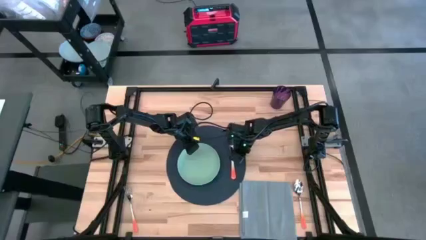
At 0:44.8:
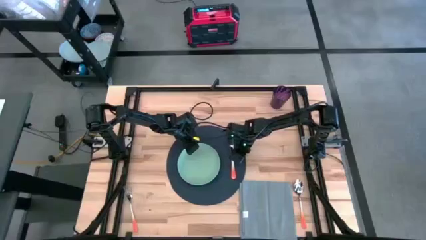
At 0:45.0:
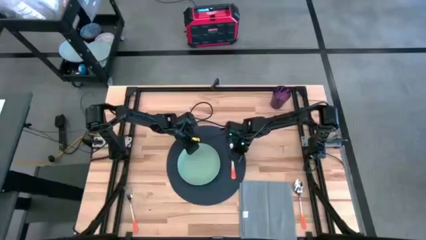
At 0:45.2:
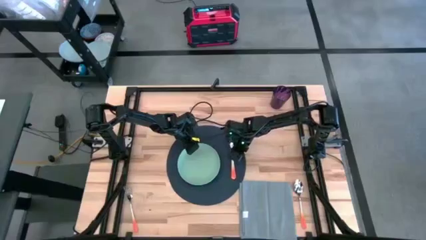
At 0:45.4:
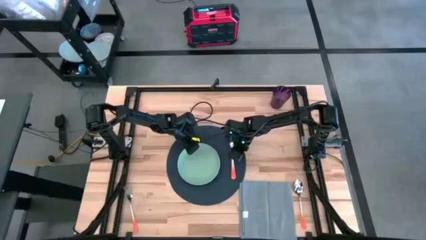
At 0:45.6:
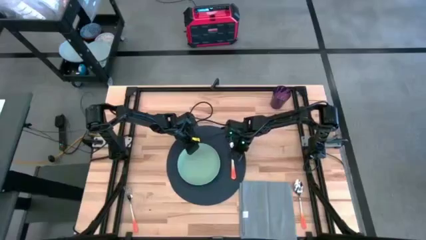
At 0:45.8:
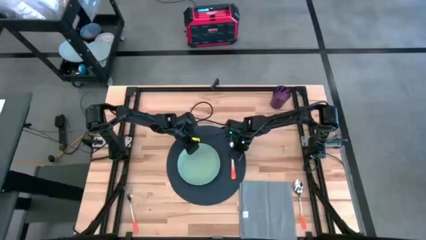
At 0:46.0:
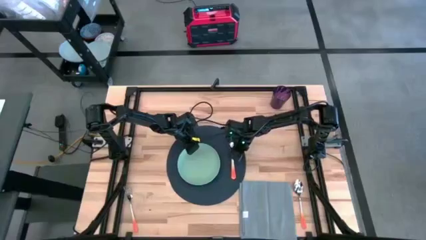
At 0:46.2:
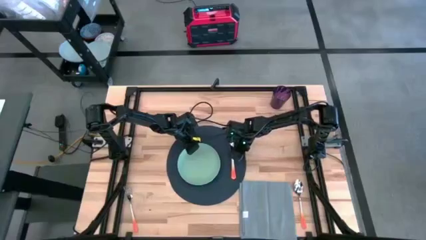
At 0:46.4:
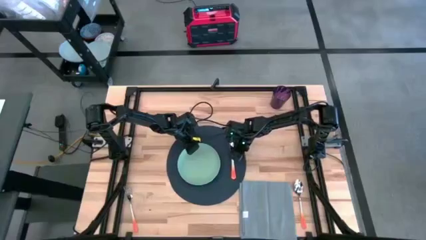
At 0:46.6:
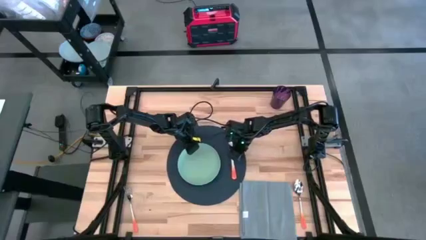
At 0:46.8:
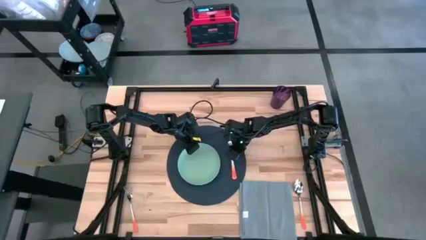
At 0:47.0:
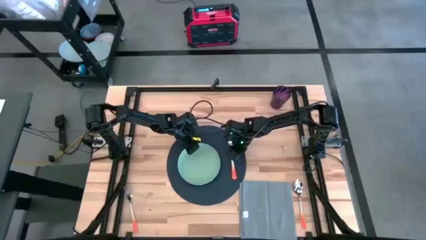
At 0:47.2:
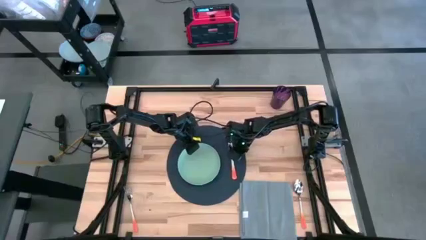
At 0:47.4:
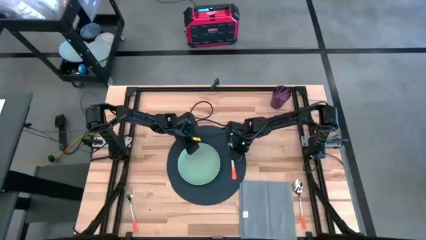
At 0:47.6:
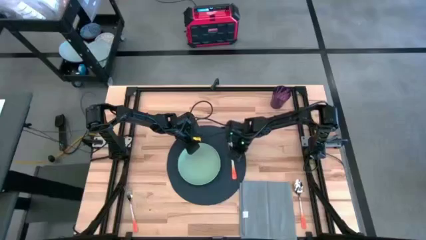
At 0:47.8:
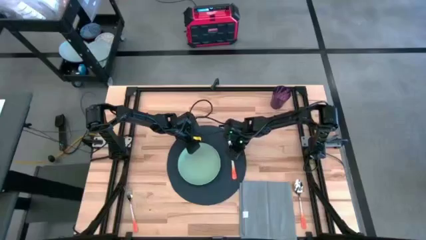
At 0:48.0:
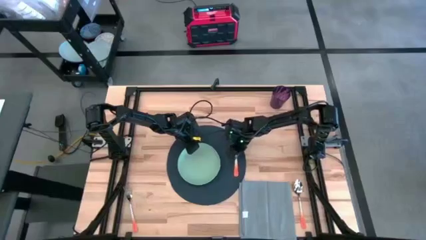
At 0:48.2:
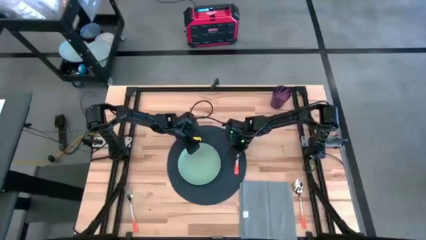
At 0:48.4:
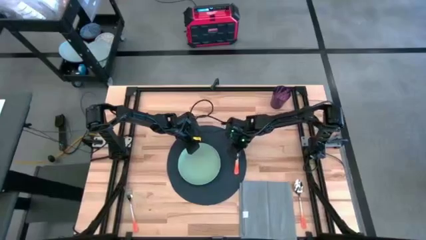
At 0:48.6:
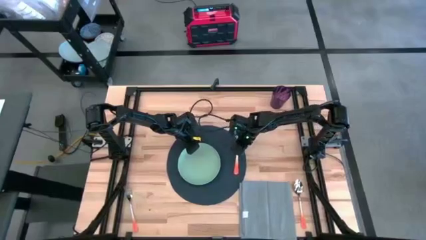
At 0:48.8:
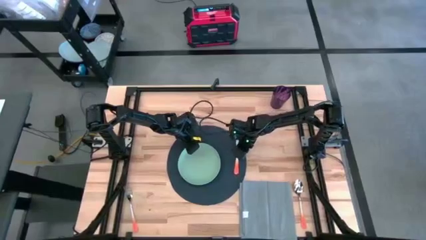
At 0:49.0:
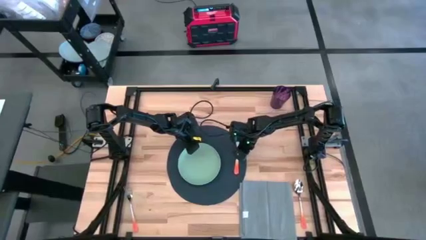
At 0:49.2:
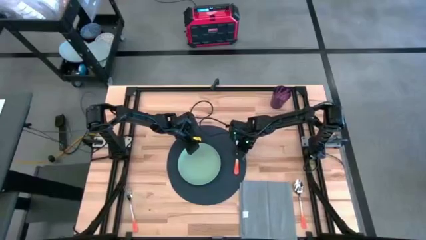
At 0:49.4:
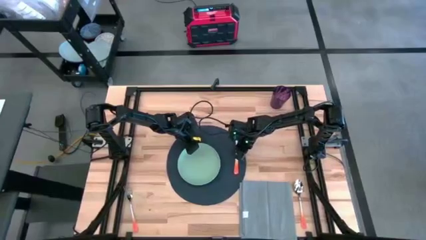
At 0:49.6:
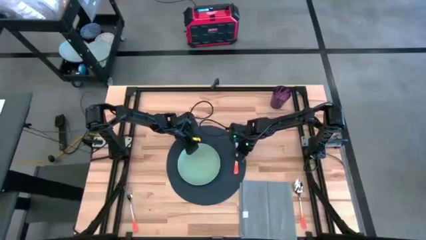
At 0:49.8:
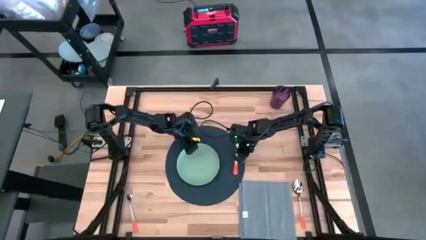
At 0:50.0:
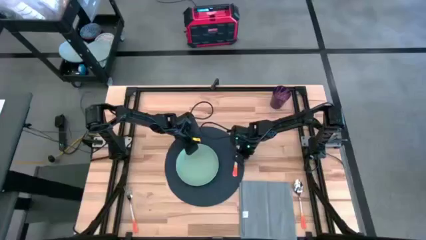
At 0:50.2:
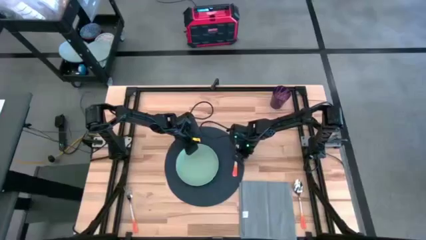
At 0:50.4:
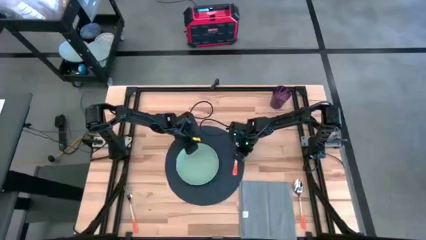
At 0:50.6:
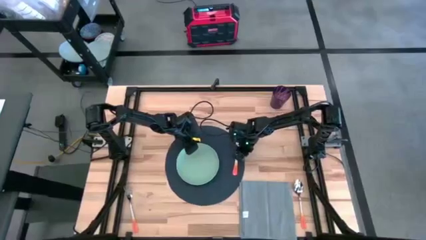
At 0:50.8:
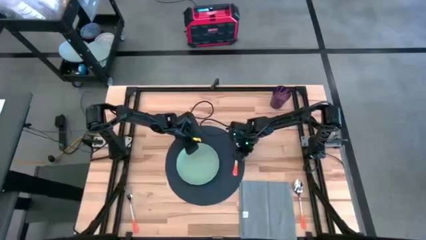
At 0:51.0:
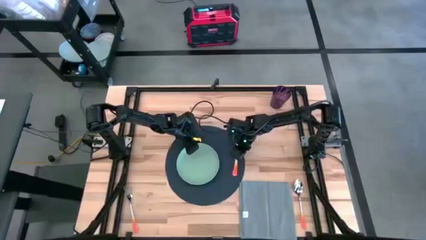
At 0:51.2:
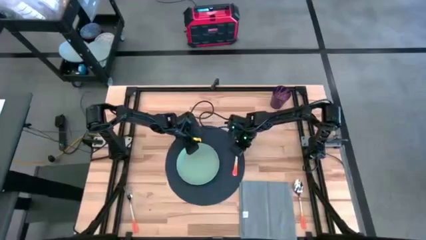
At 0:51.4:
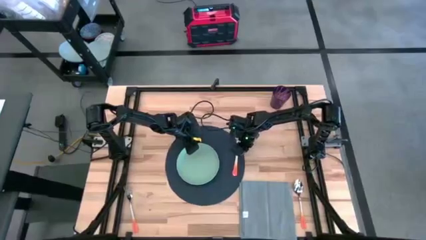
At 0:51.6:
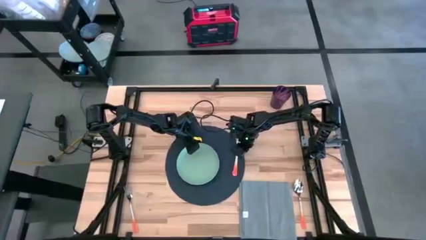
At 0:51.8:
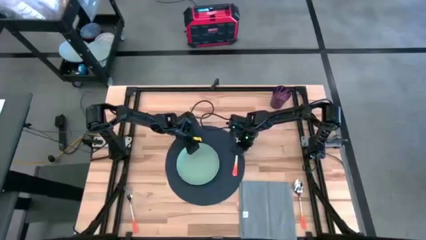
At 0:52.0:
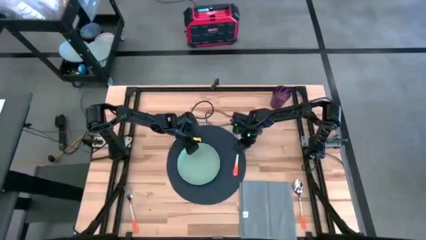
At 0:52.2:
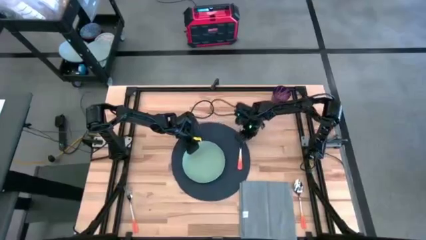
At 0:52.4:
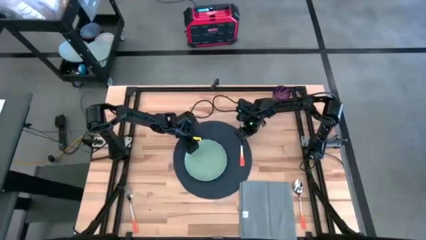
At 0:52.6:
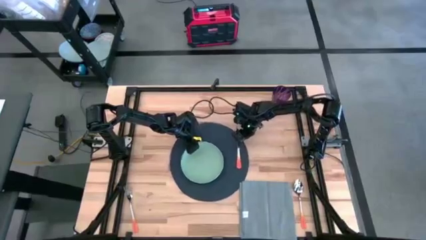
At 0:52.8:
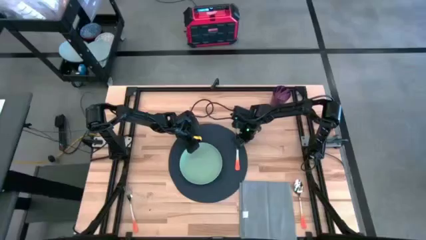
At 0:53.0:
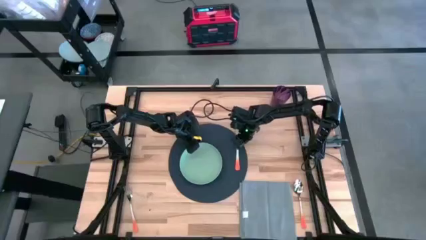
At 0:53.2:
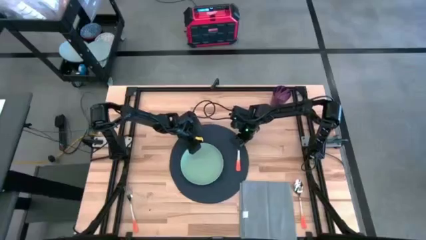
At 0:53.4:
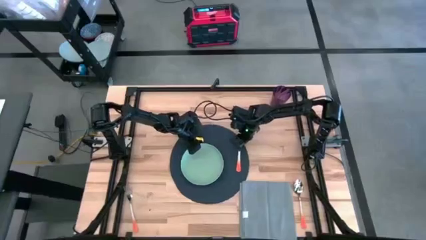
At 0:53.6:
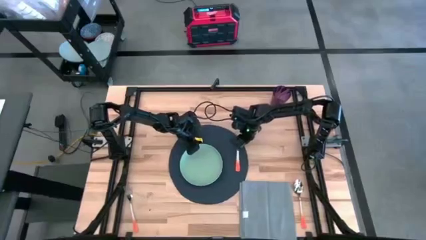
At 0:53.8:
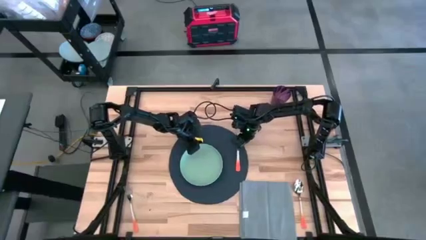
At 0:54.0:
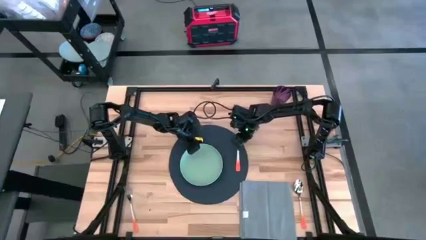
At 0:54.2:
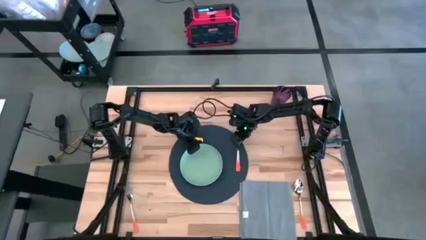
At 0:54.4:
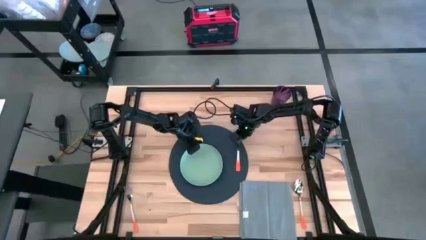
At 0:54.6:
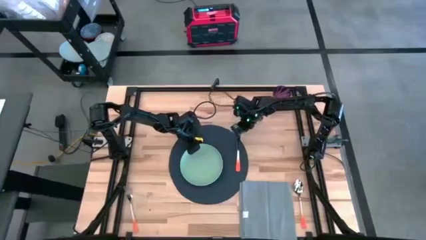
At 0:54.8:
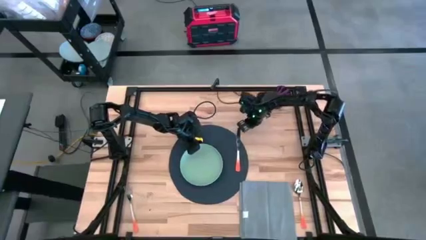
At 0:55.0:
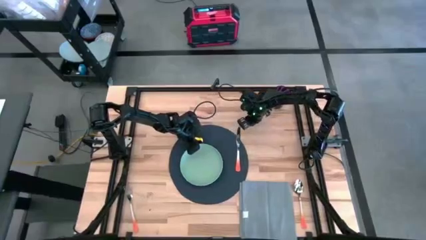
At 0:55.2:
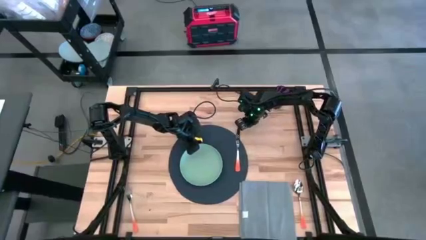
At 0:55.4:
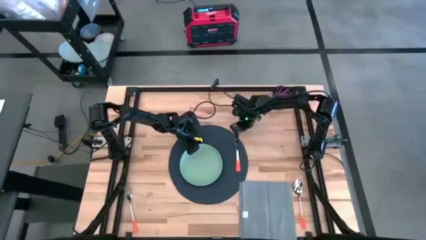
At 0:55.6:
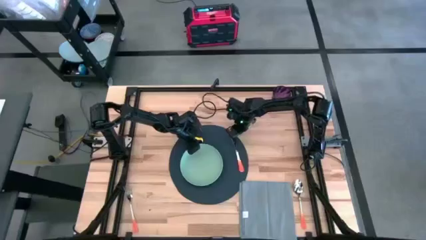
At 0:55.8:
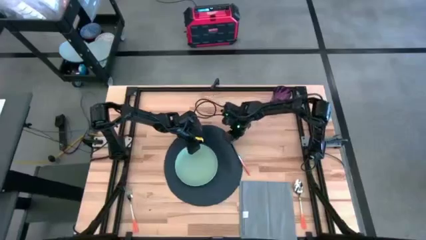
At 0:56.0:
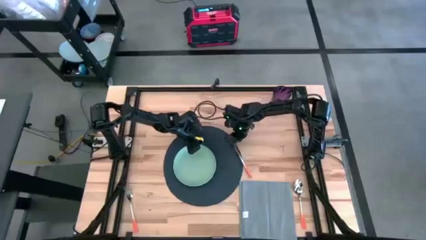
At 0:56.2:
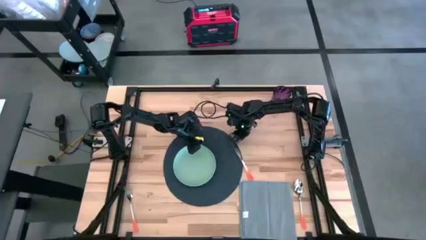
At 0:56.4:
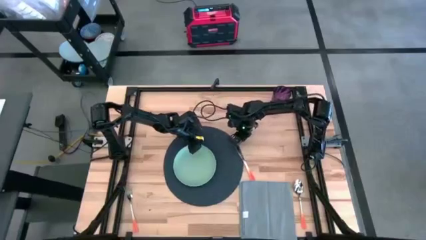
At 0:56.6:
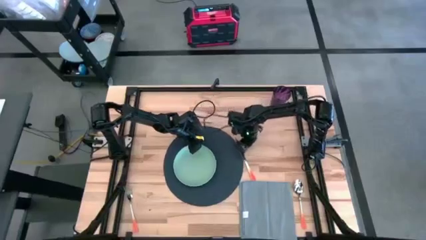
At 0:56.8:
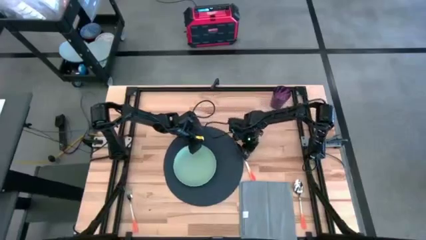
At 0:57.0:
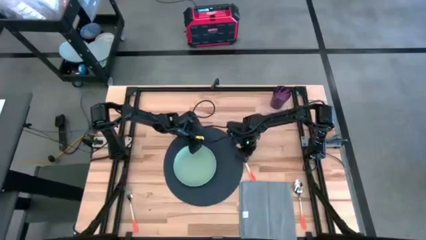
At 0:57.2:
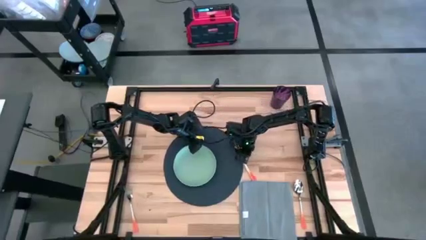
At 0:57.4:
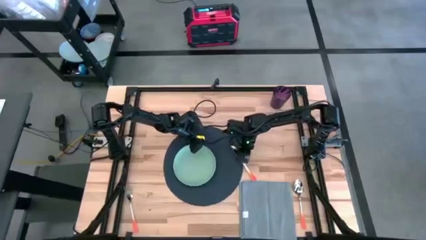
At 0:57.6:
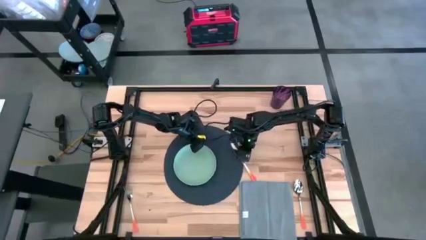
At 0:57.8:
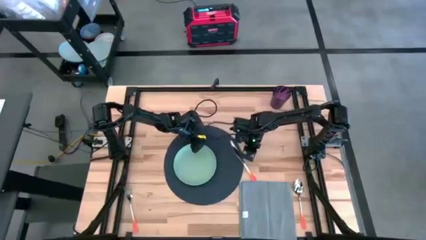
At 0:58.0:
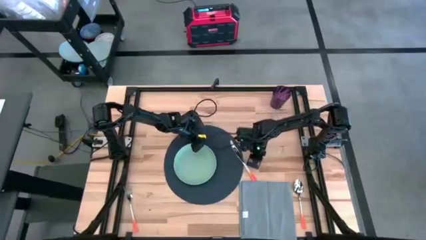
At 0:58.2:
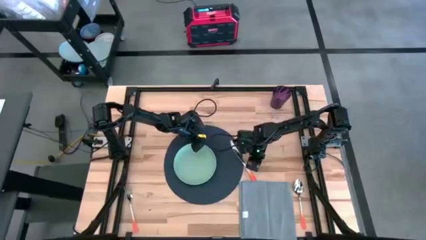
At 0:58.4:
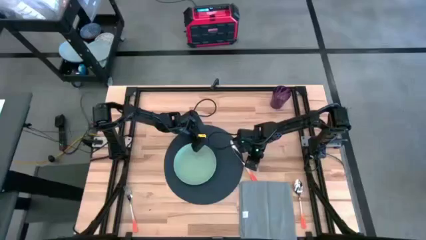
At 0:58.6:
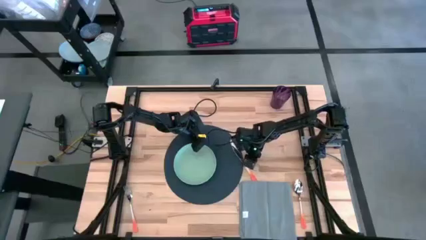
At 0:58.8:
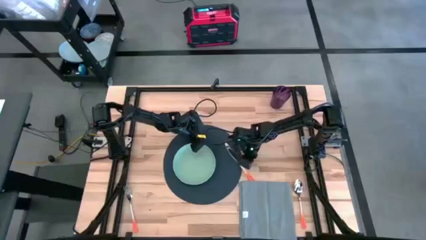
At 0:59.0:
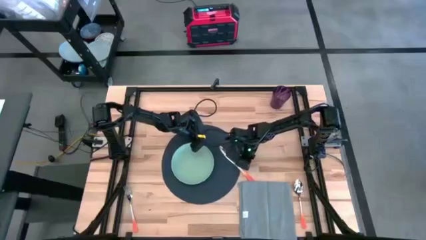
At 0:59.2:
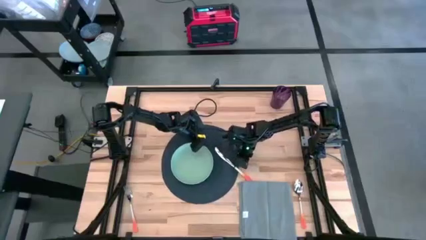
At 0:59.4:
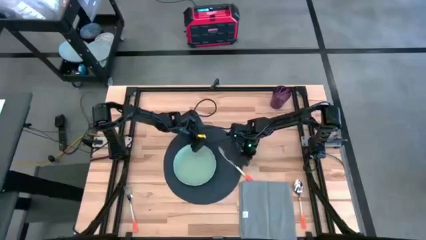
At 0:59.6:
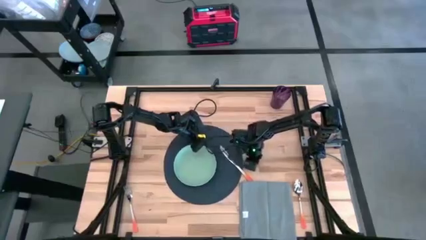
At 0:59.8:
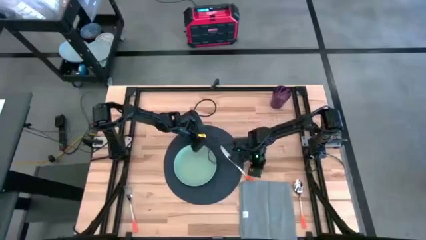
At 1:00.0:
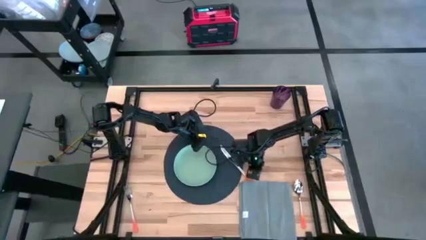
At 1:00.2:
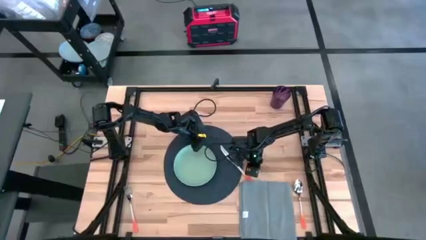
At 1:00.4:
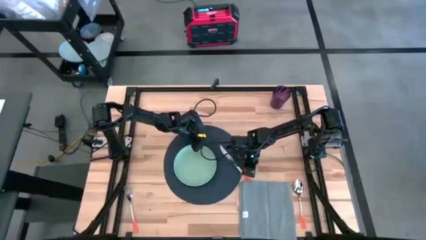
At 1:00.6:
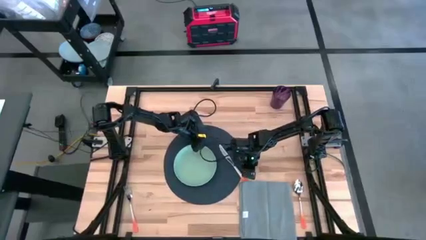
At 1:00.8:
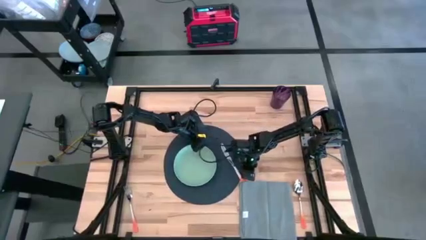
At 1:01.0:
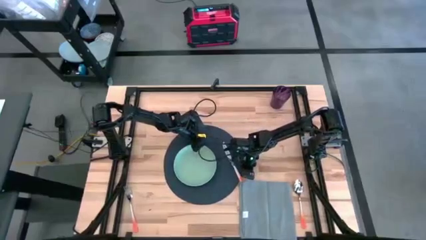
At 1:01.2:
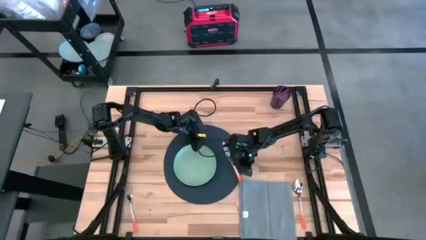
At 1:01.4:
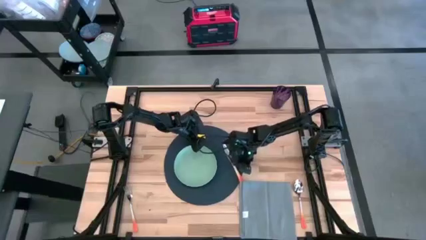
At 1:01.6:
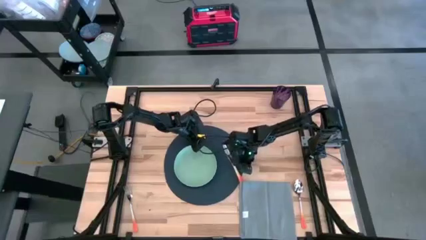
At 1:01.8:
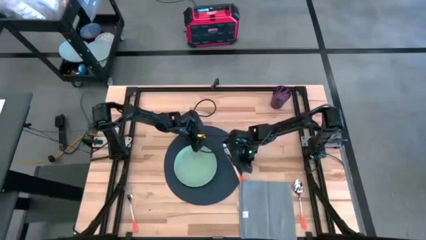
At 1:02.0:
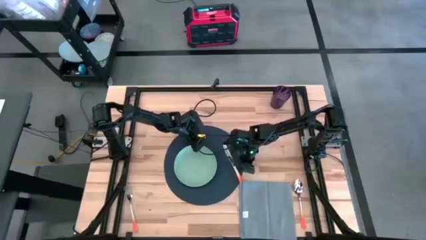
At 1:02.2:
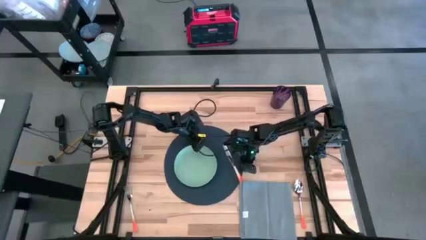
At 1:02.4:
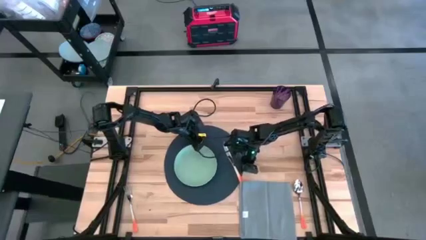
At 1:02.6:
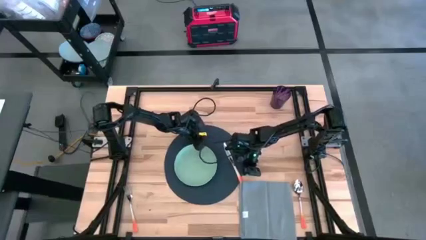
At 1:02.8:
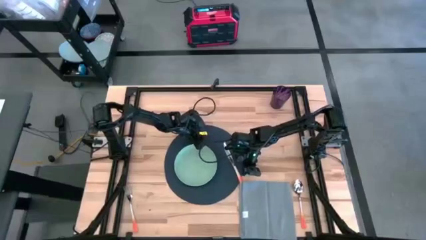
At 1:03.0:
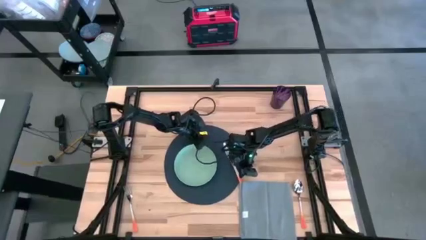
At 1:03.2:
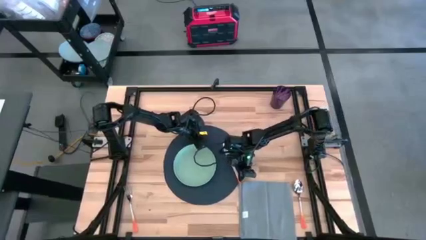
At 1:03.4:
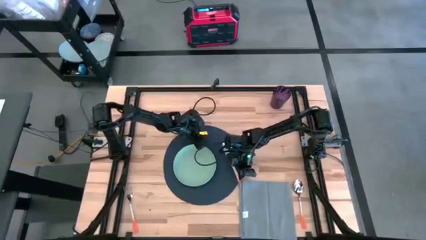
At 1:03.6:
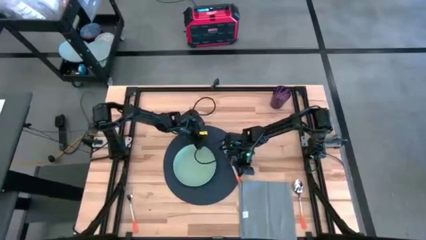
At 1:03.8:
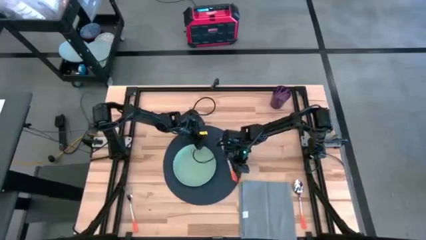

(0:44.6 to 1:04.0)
Task: Set table place
Put the orange knife on the blue placemat to the right of the green plate
